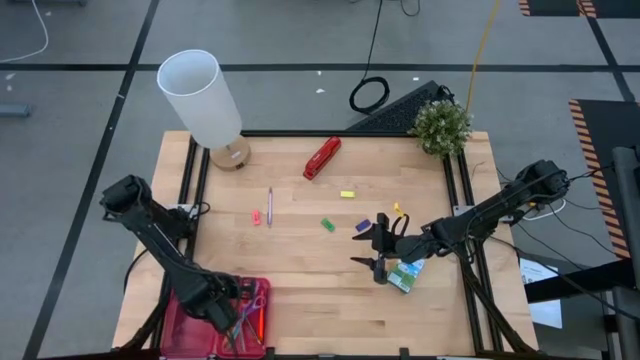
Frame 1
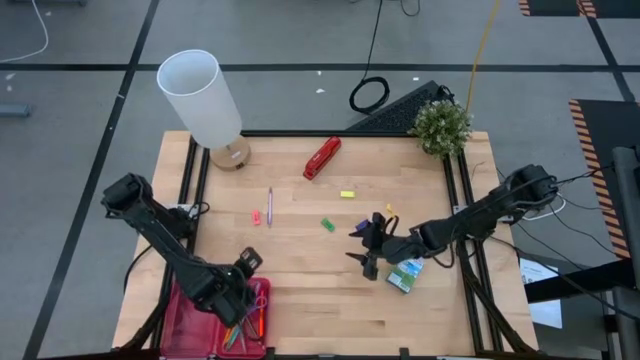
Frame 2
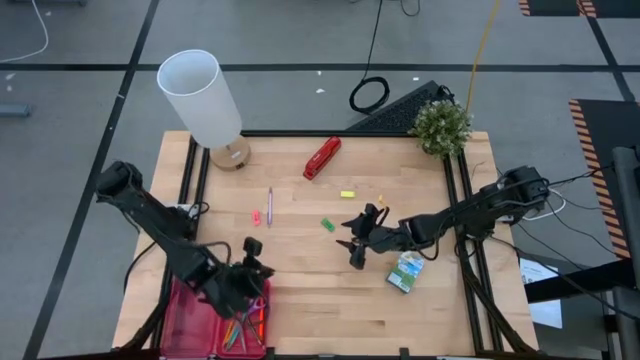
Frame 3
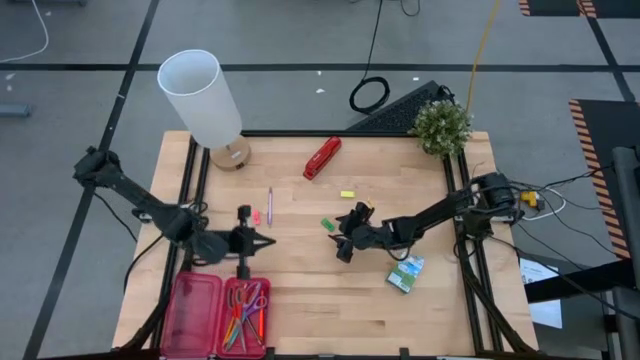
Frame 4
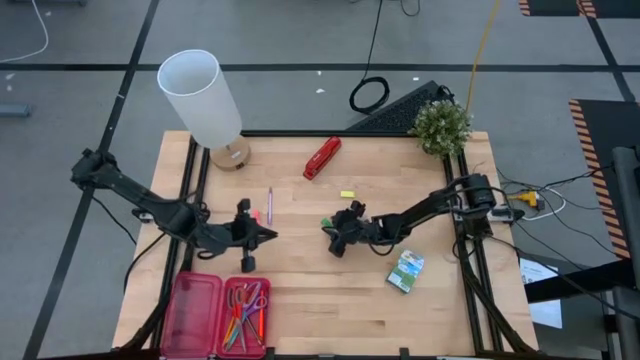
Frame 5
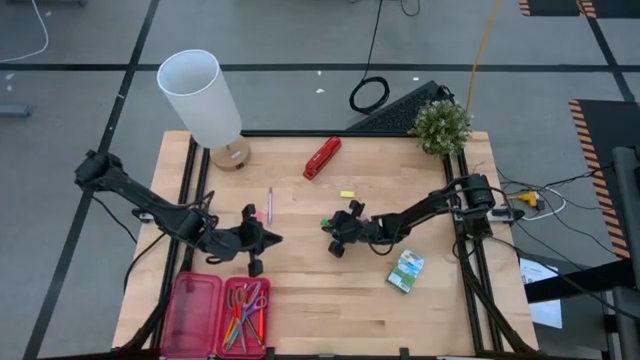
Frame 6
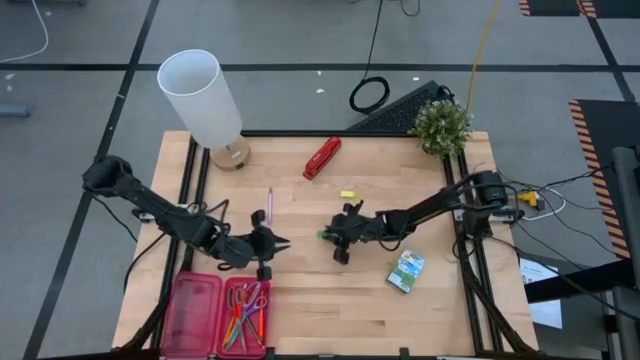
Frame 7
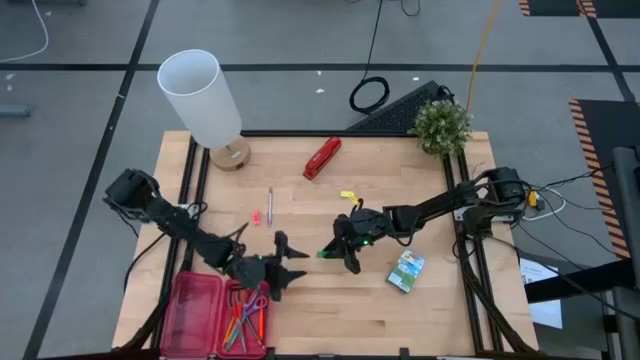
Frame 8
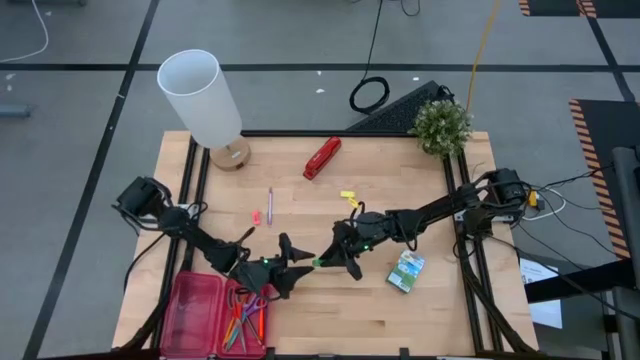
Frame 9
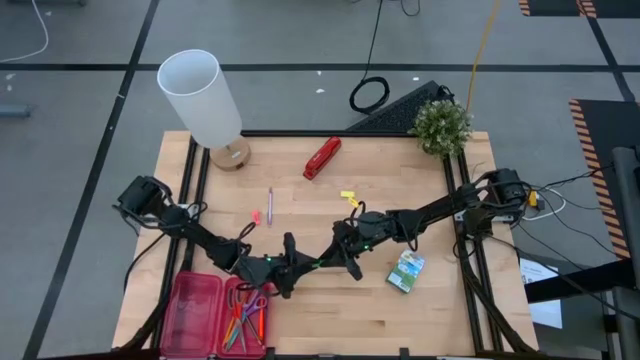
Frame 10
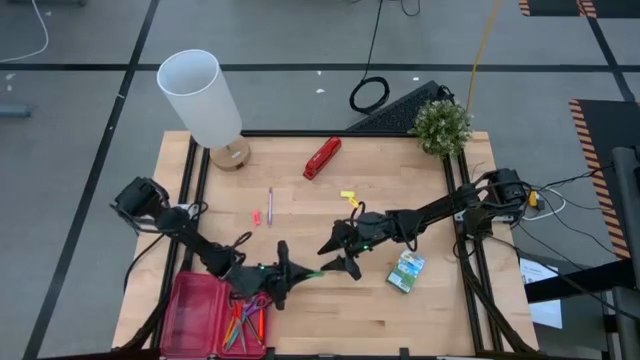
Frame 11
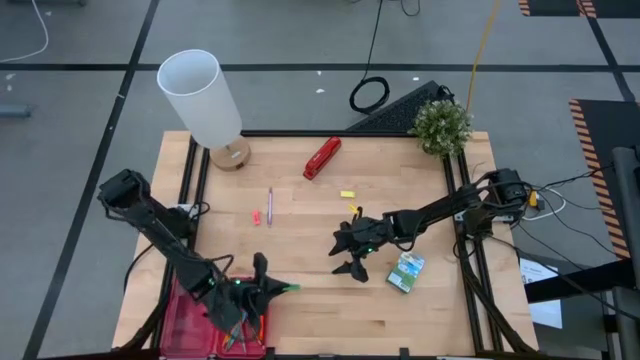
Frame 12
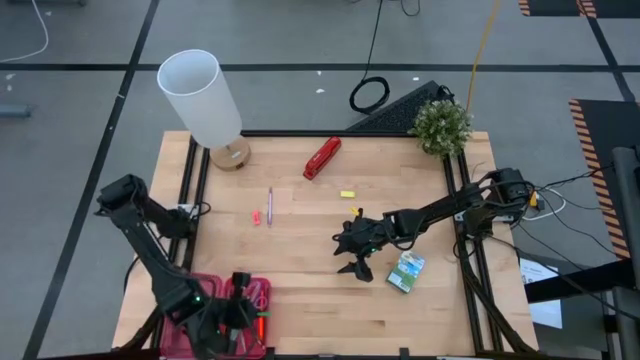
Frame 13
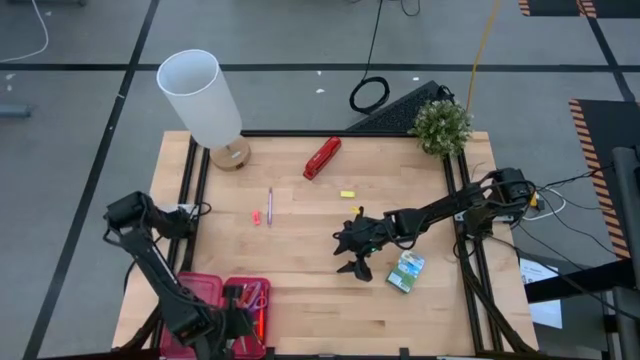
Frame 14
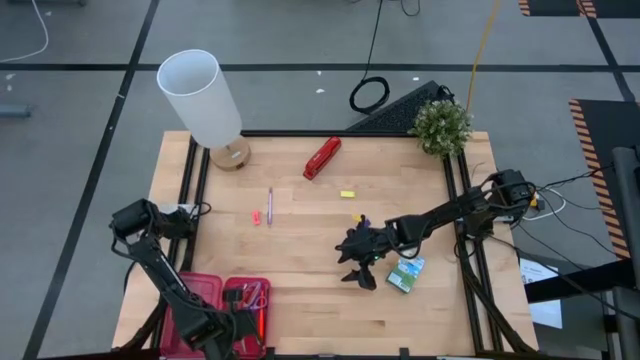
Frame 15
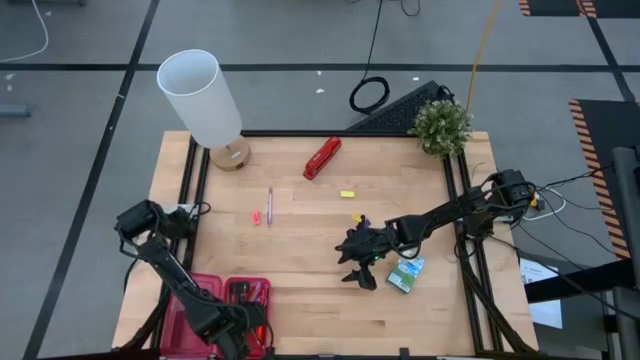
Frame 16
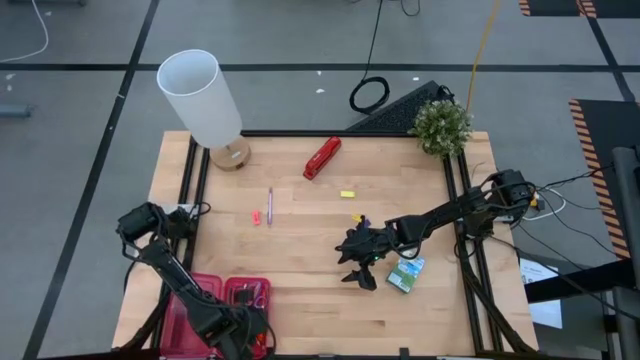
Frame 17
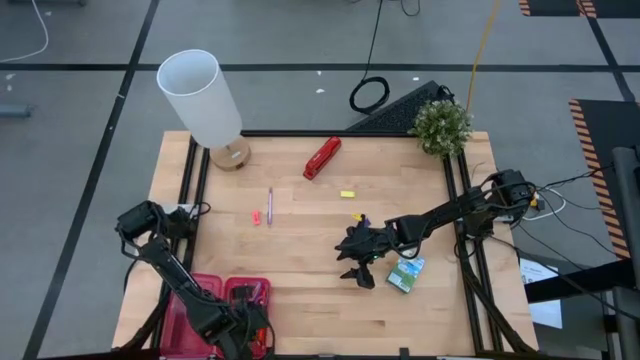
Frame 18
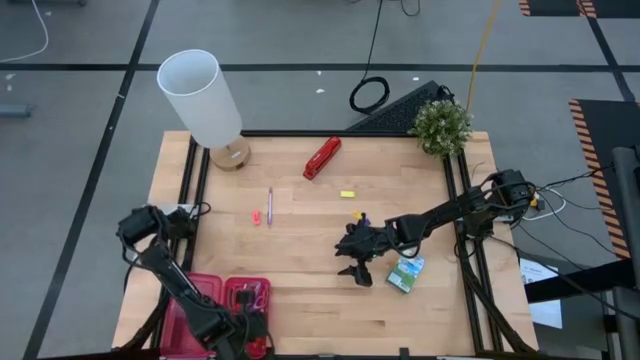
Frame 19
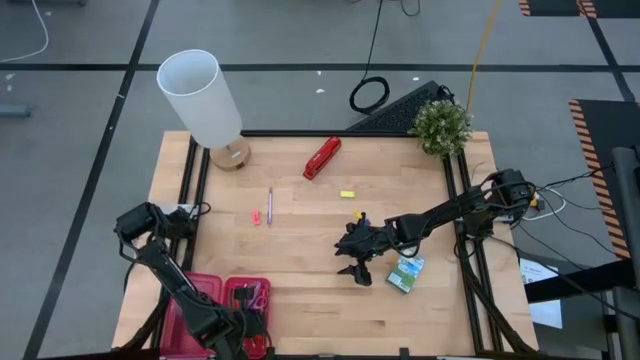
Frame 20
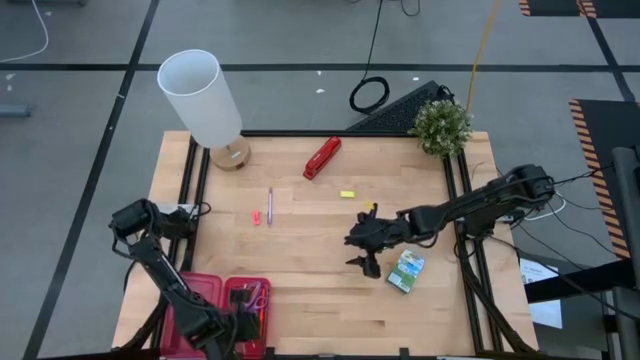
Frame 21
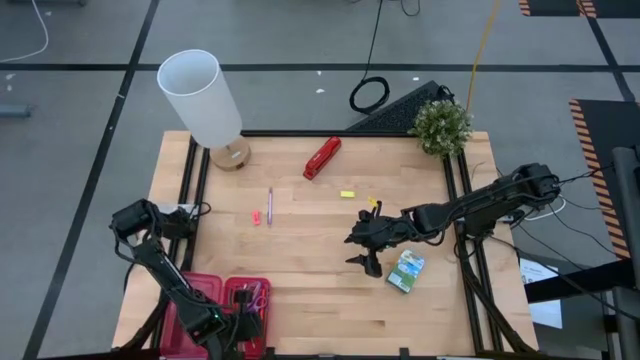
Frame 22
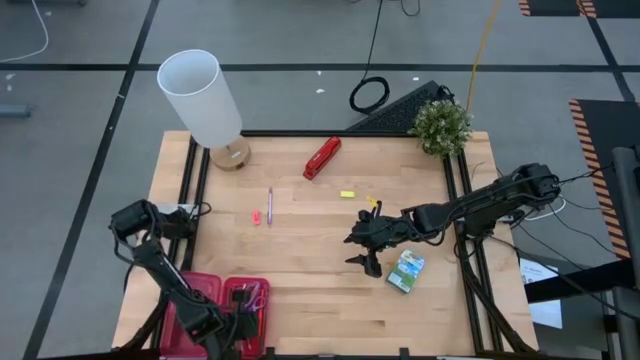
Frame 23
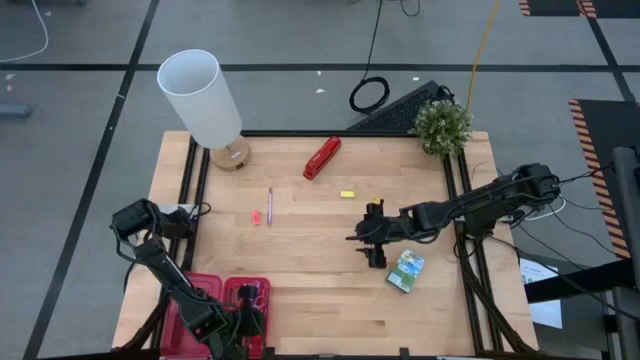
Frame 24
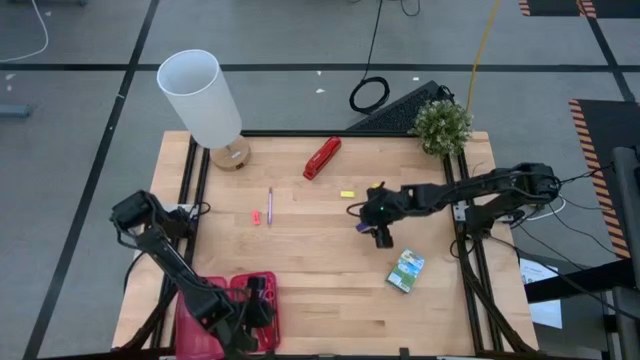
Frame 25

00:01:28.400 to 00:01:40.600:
Task: Pack school essentials
Put the green eraser into the red supply box

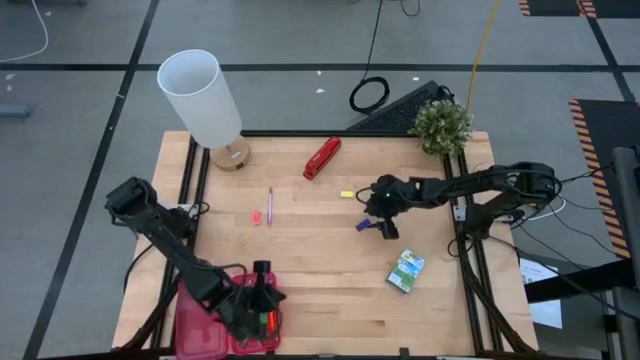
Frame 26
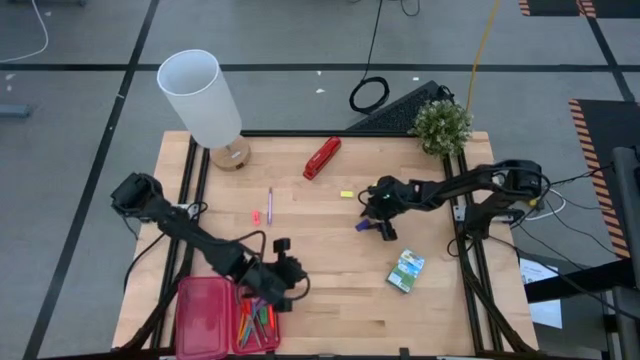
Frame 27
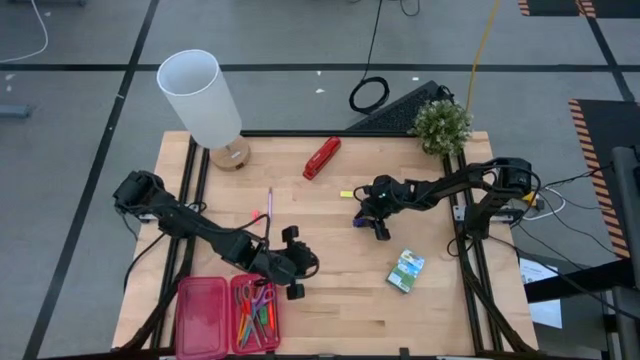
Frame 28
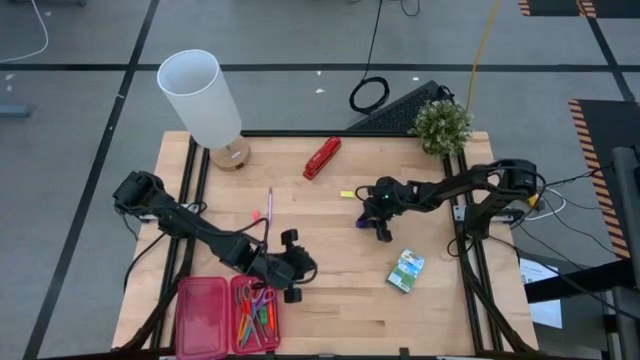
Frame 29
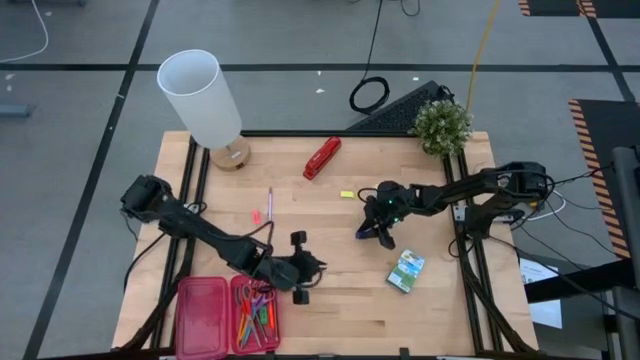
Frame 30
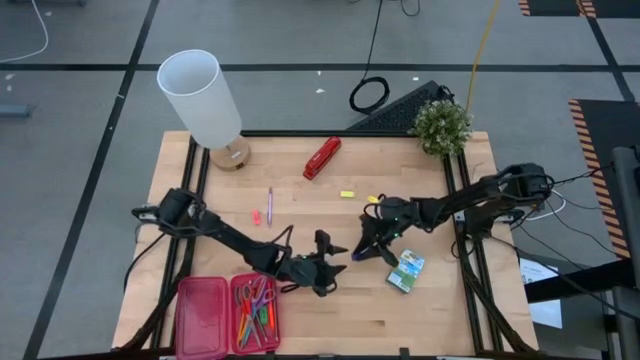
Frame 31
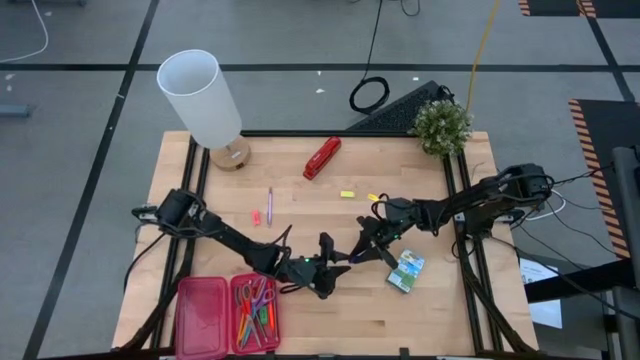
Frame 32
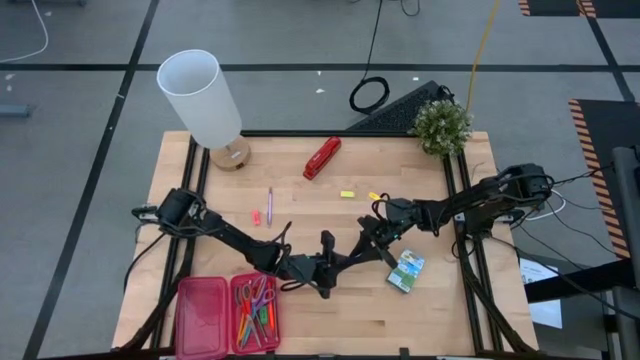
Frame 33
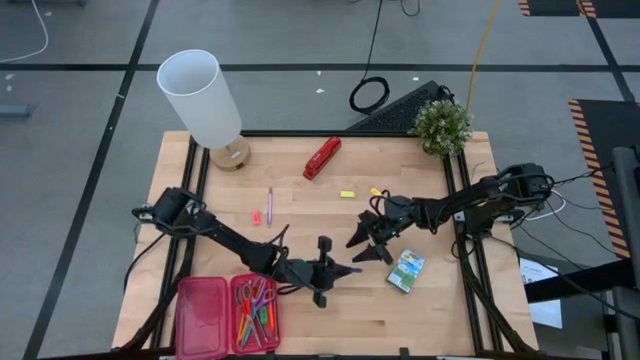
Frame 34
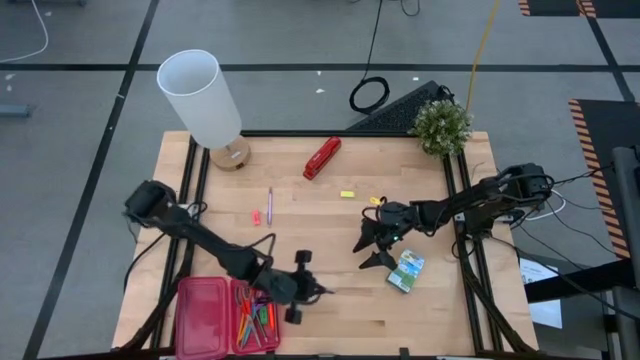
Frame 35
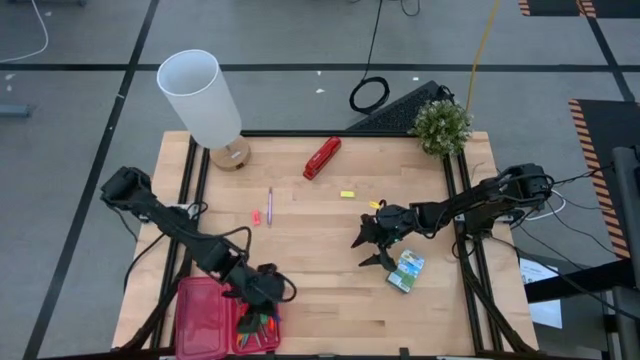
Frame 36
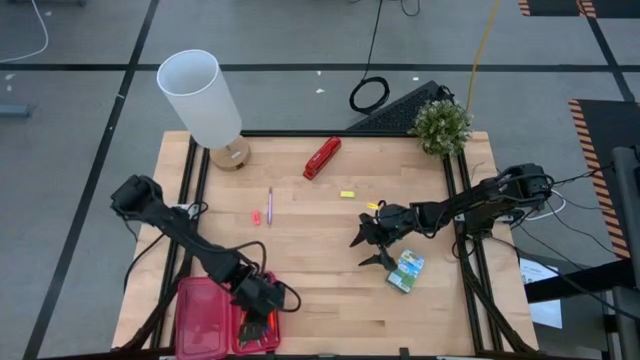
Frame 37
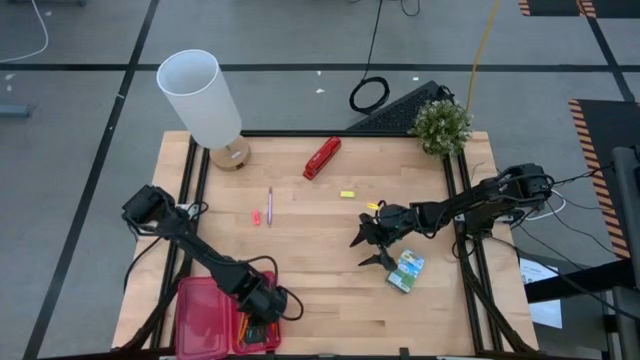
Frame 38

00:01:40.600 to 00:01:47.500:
Put the blue eraser into the red supply box

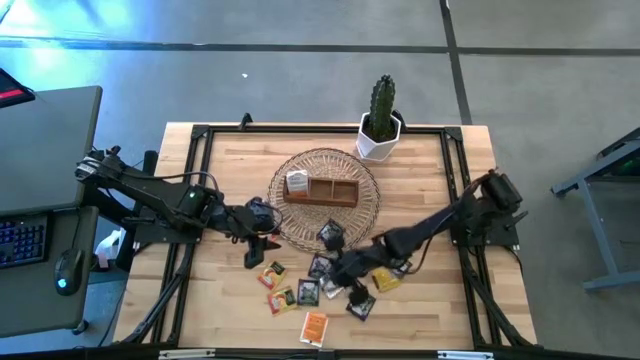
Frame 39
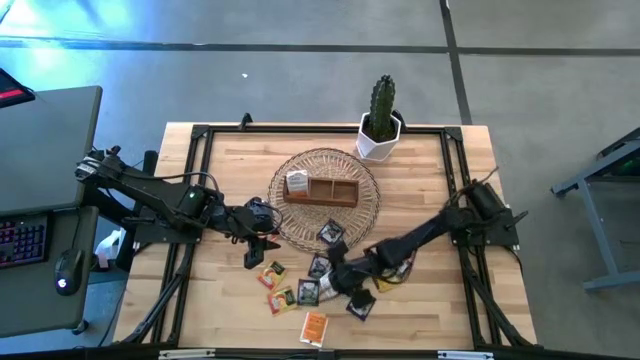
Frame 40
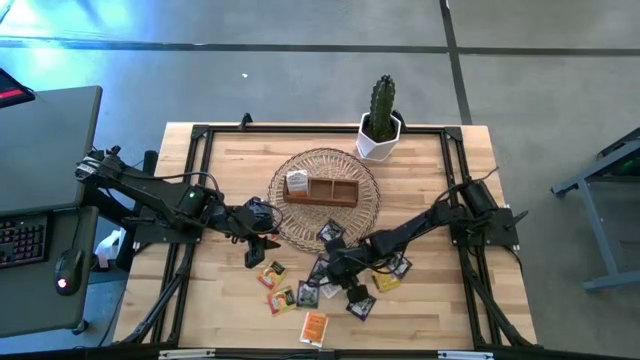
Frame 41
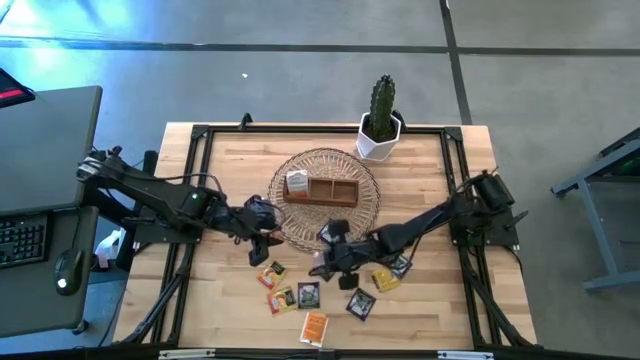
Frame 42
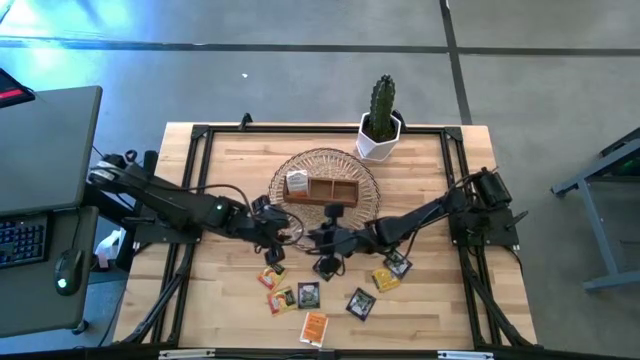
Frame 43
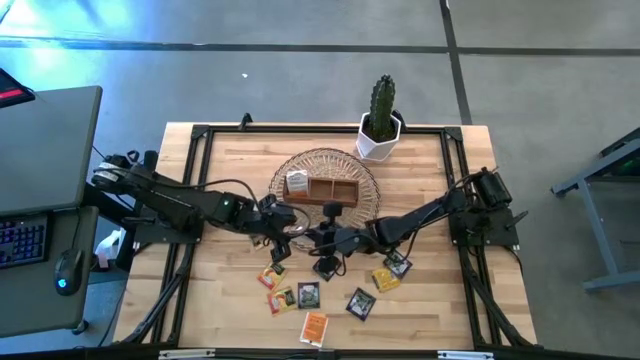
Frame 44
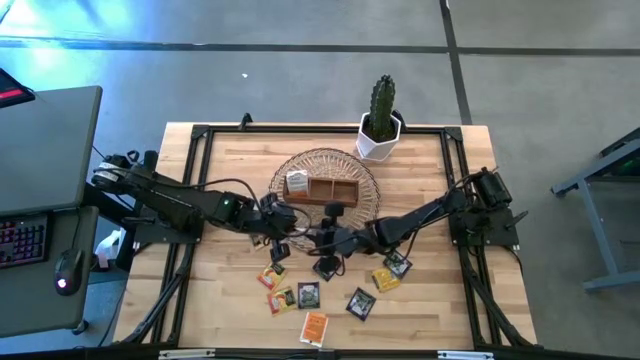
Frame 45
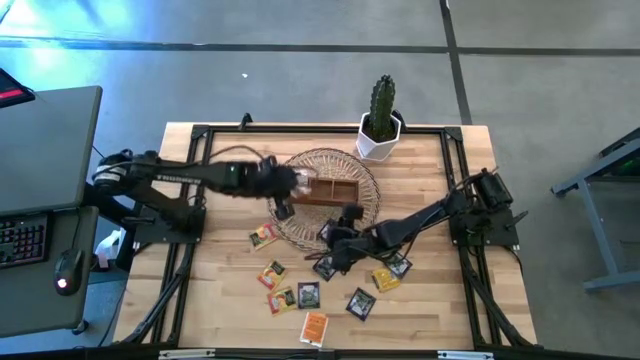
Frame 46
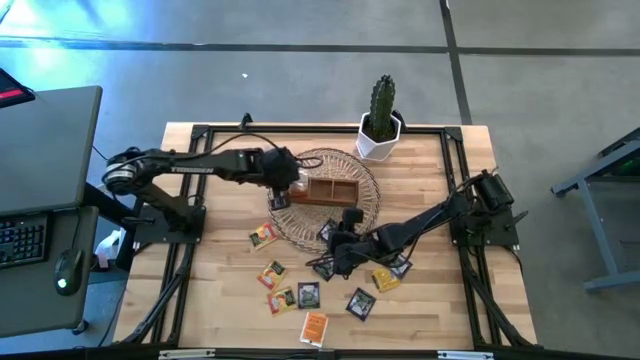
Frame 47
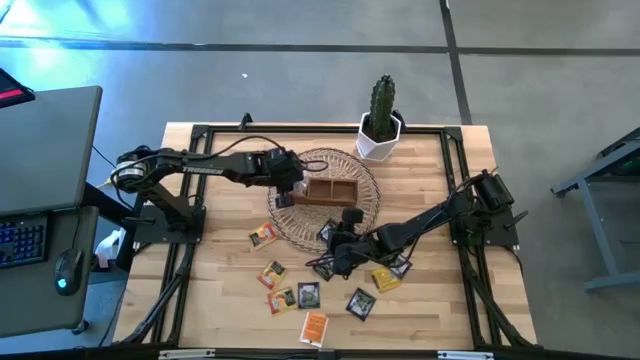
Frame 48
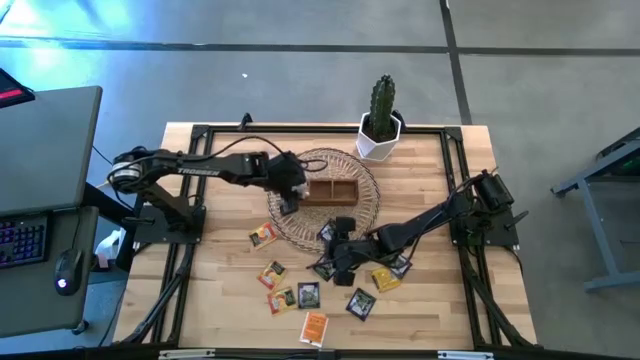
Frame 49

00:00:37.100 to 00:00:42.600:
Task: Pick & Place Tea
Put the orange tea pack into the left section of the wooden organizer
